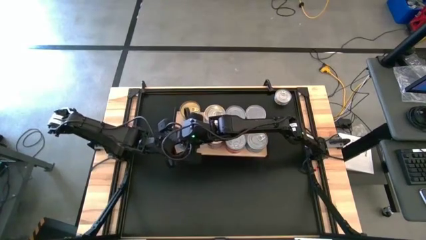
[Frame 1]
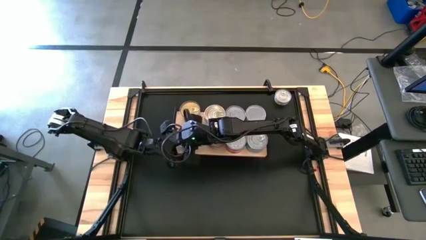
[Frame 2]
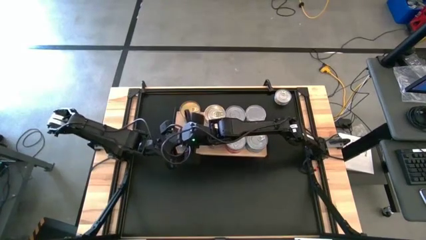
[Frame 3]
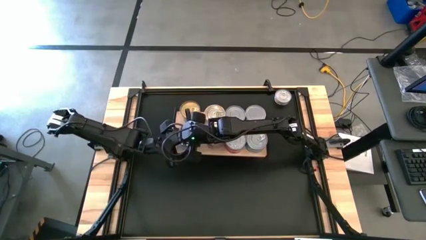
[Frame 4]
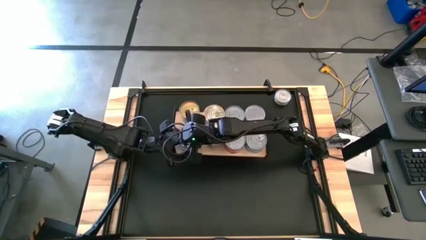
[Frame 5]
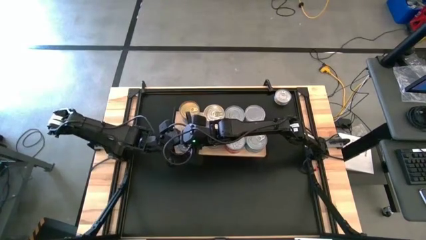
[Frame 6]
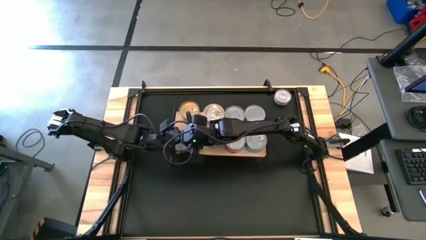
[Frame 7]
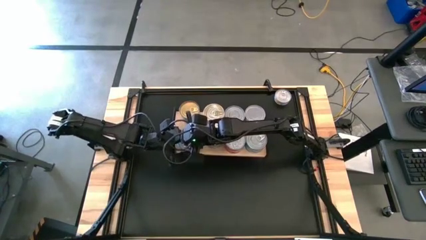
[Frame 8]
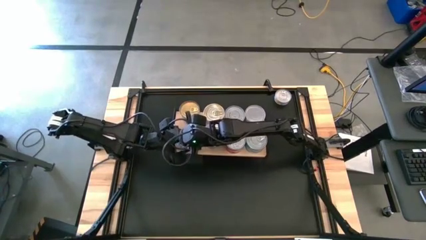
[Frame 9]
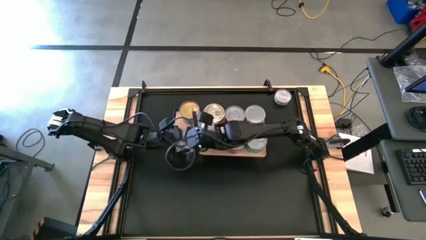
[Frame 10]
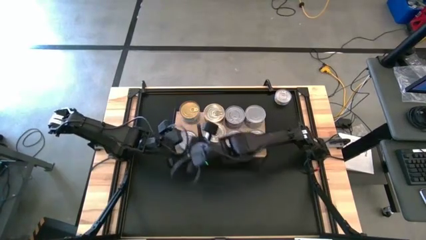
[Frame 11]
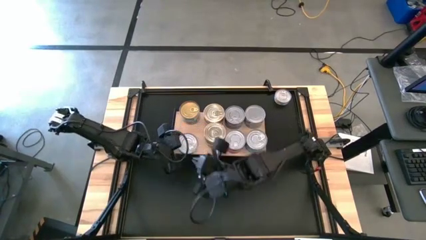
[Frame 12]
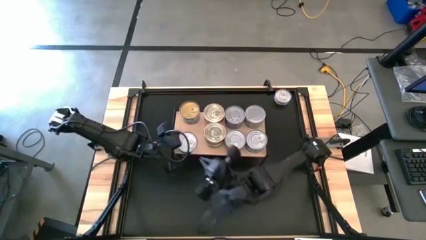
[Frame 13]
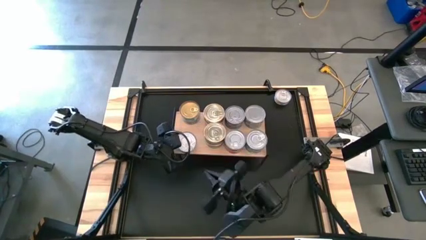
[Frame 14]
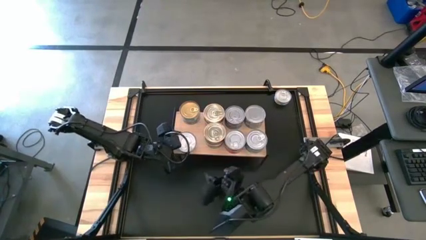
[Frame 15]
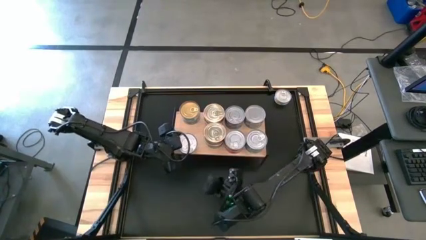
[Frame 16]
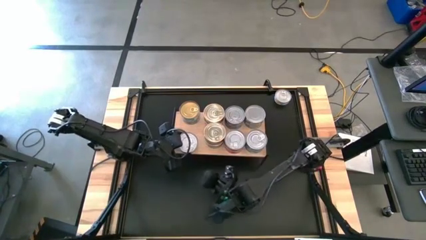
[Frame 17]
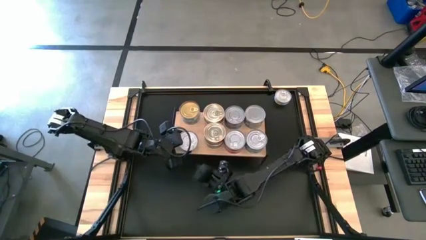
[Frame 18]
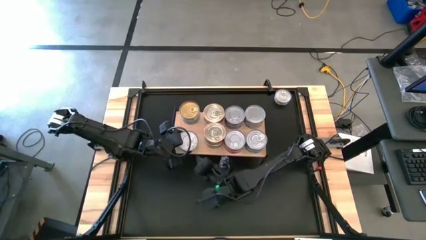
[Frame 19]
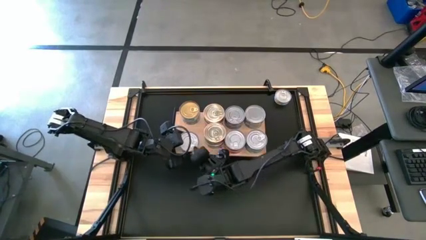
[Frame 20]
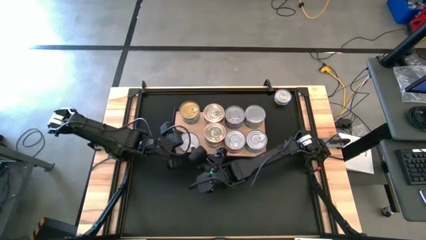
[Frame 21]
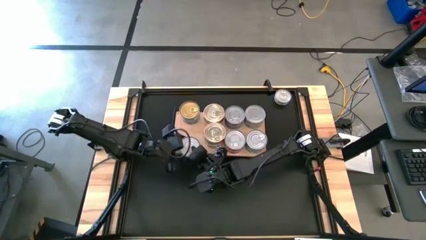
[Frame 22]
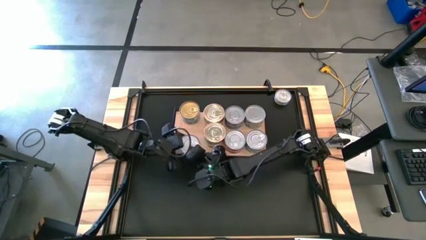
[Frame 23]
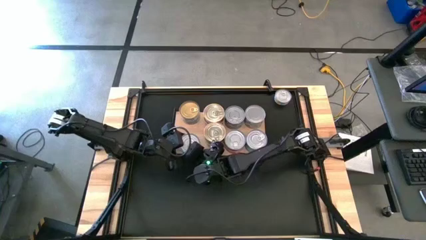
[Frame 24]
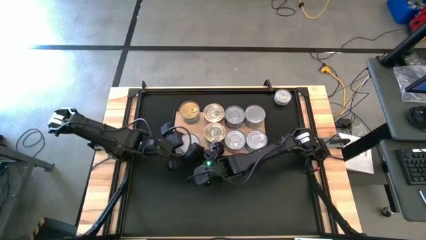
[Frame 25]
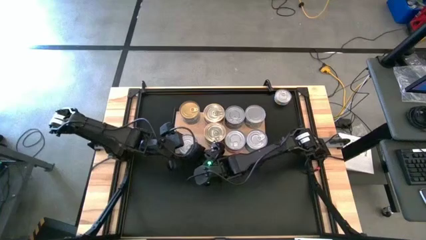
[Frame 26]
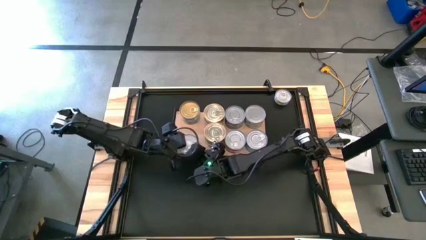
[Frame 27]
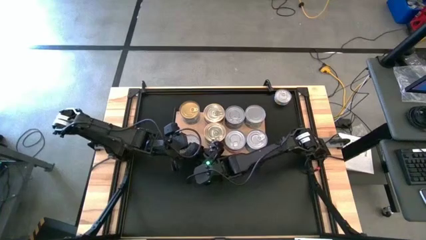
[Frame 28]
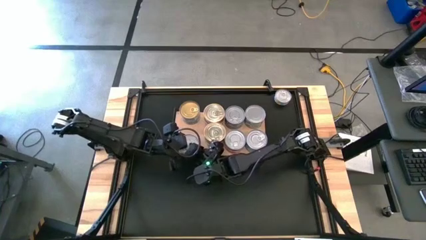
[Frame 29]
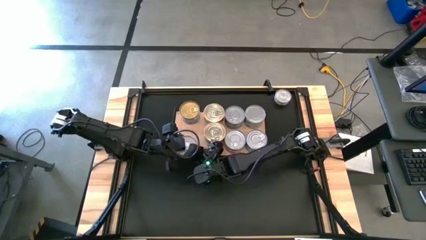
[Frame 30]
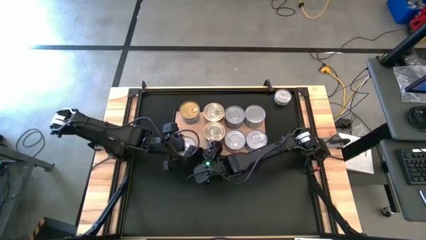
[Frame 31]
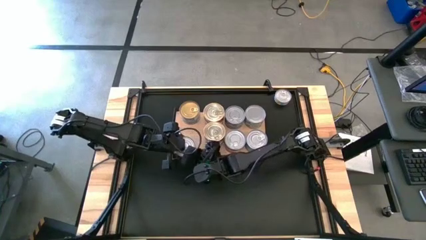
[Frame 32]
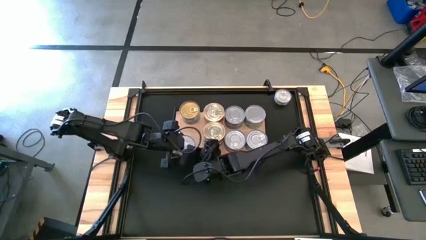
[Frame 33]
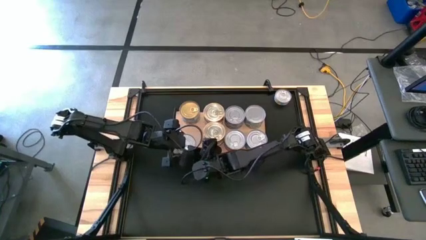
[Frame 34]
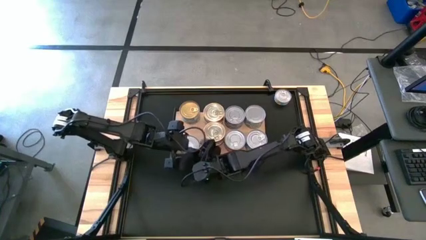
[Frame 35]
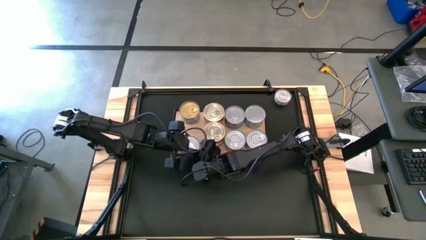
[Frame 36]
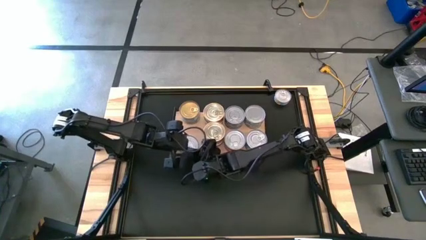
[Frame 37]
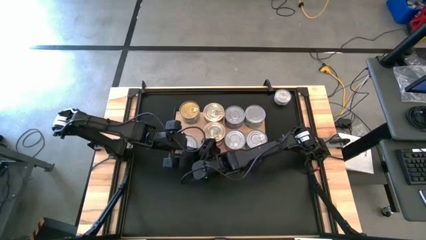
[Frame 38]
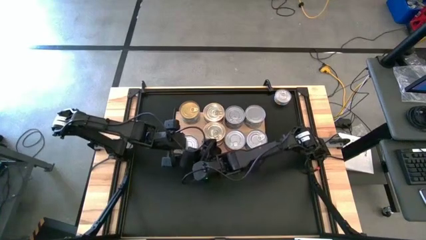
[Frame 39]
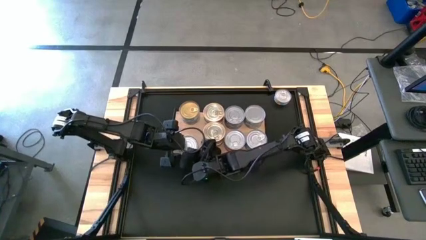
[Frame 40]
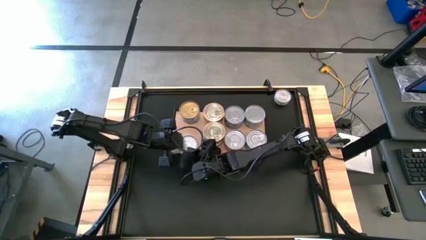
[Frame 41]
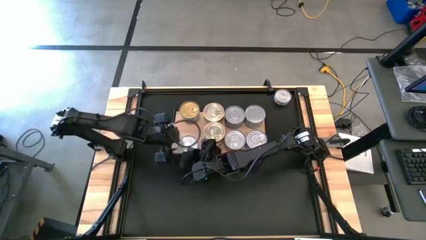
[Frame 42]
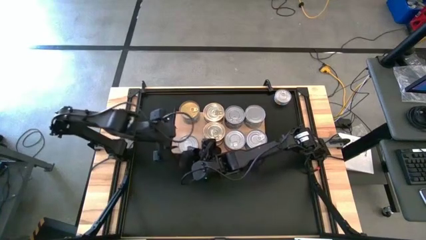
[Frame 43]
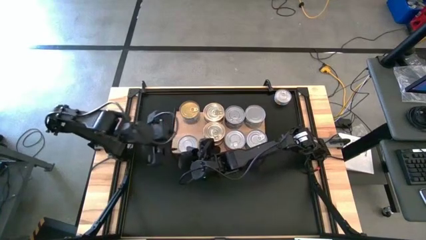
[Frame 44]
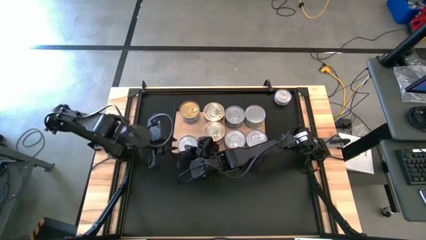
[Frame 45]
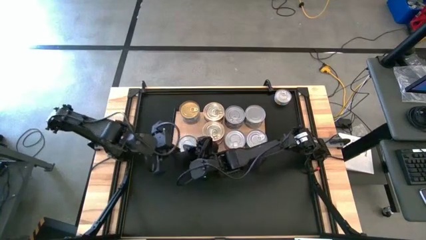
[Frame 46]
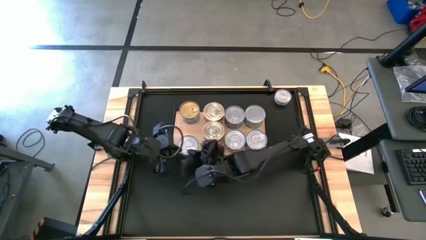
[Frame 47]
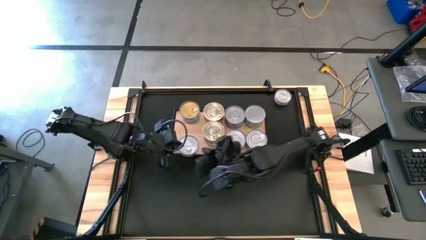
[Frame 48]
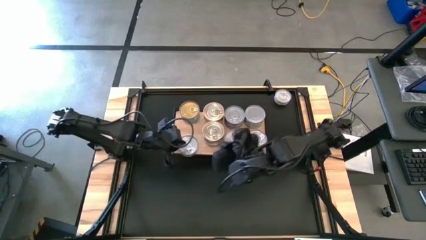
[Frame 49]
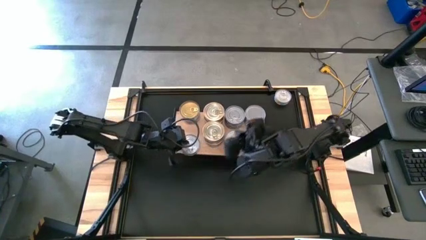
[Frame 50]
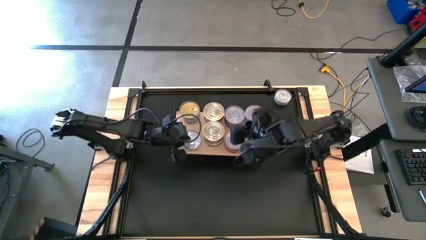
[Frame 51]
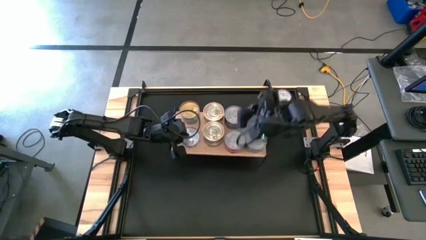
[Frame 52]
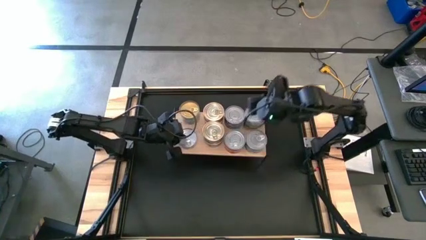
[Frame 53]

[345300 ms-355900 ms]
Task: Stack canned seafood by type on shelf
Put the yellow blue tuna can on the shelf

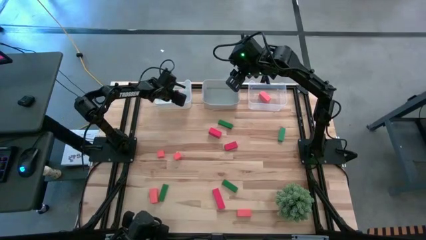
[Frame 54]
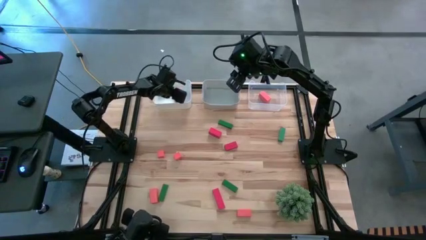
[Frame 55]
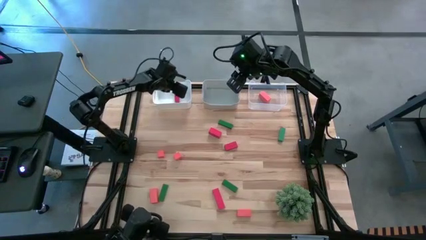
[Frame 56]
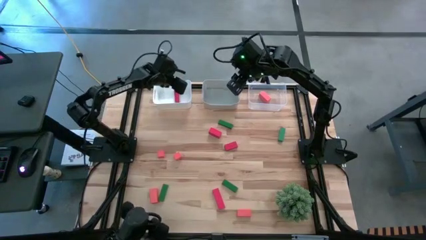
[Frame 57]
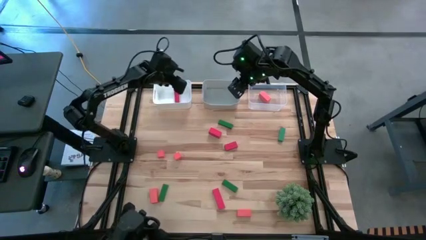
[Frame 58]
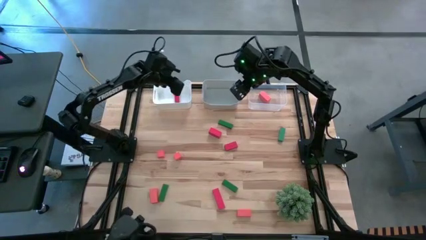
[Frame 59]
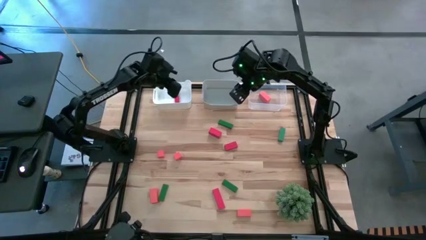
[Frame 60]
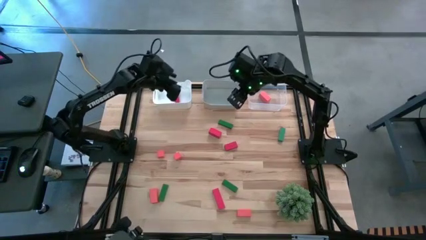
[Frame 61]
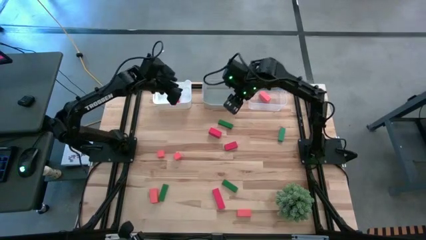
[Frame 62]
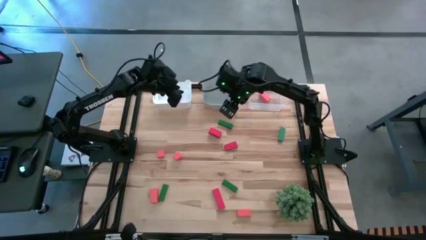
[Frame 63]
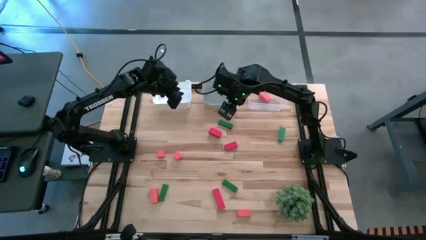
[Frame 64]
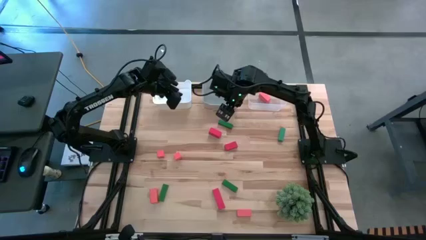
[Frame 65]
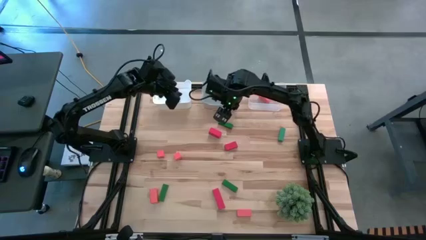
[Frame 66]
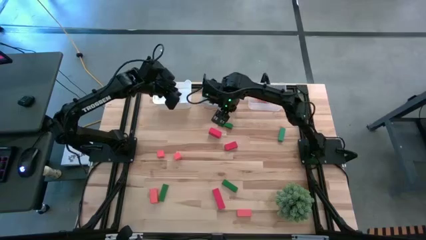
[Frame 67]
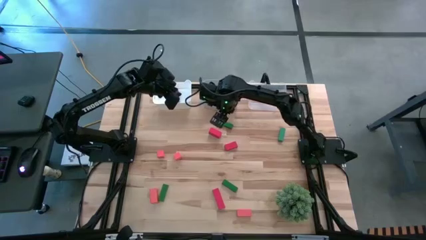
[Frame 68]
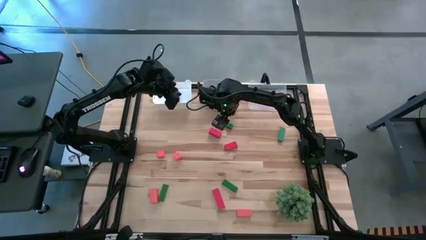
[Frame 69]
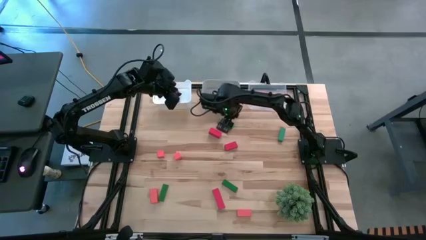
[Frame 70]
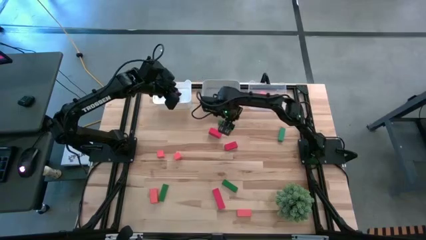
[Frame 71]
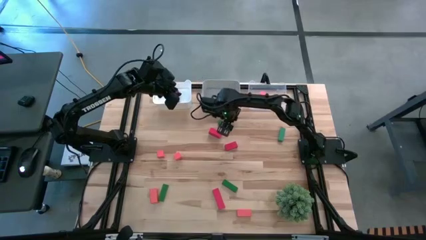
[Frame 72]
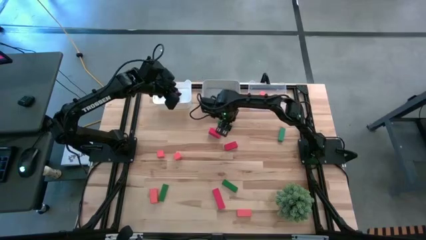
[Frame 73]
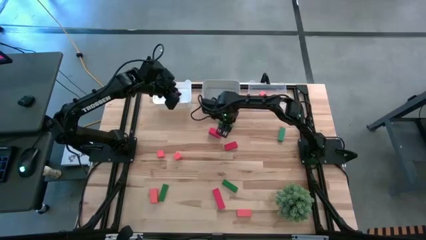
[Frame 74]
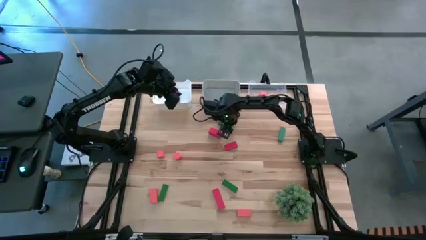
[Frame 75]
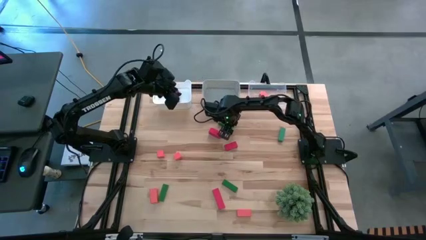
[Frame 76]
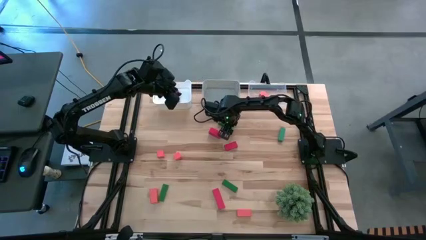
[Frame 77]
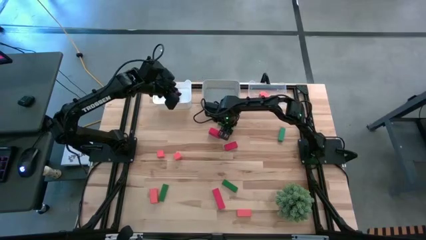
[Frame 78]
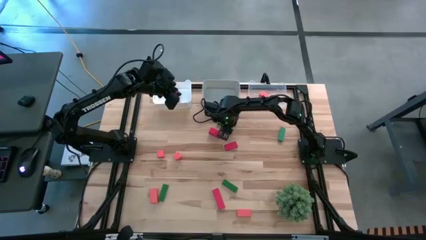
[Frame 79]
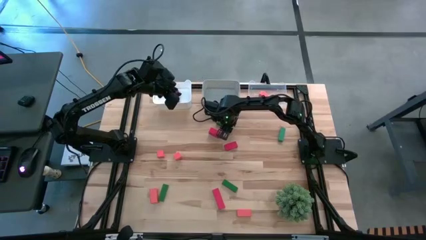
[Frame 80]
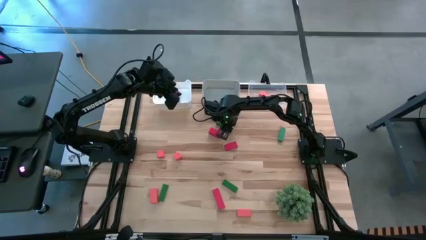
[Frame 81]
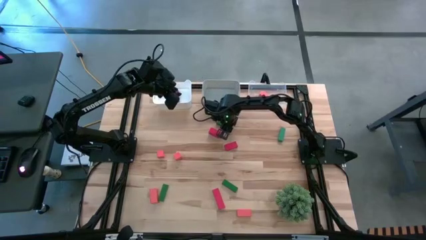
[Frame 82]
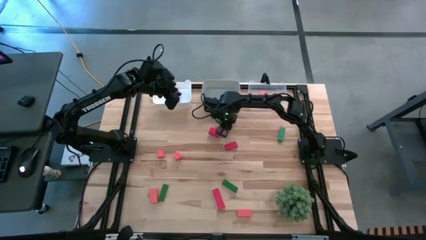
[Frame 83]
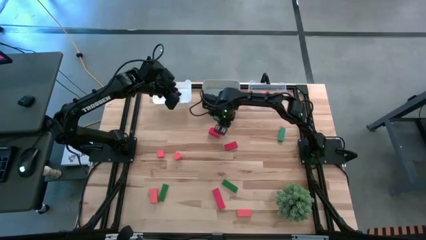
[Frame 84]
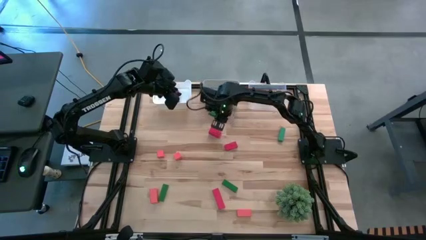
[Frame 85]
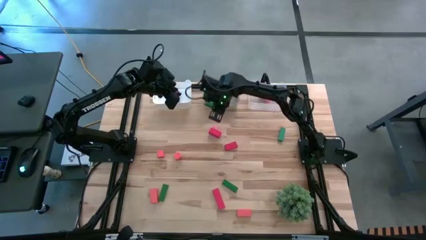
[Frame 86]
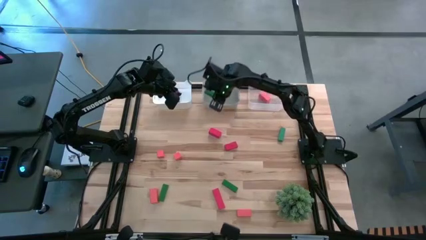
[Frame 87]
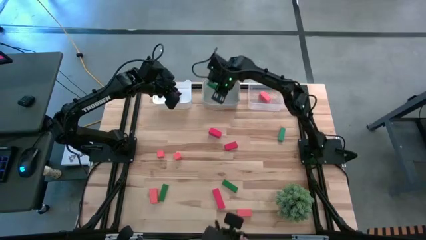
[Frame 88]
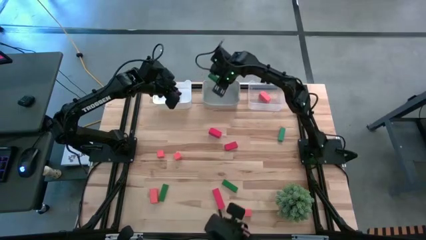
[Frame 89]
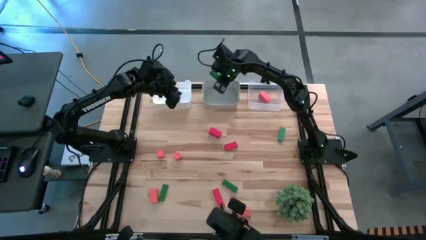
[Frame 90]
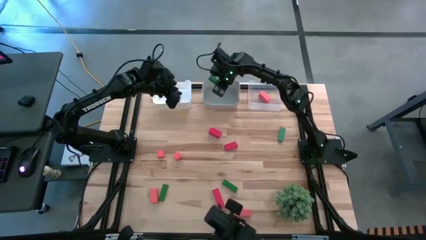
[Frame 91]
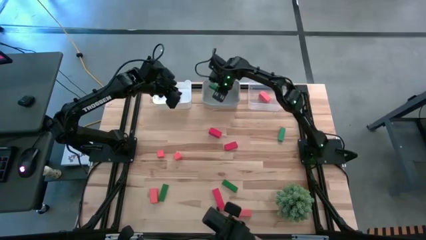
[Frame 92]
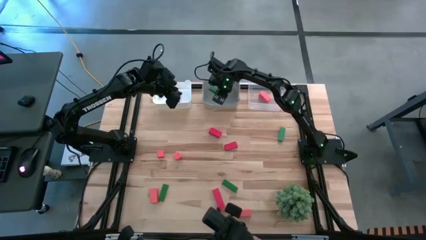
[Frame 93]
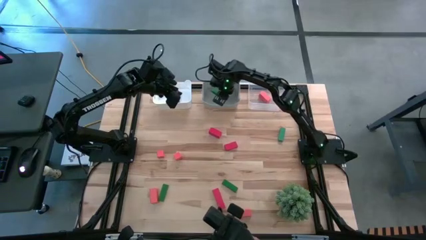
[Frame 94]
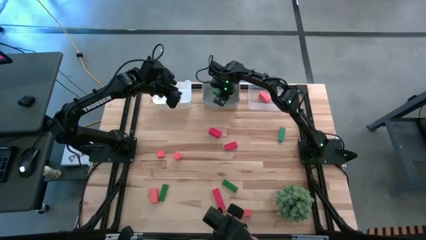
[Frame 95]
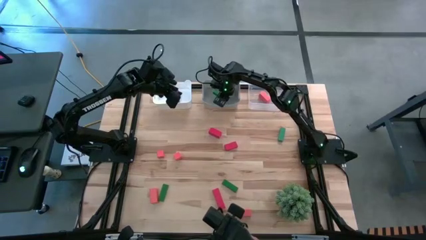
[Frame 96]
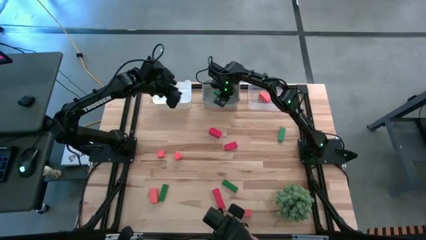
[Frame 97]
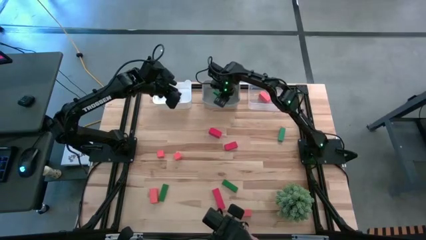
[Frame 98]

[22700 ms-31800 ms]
Task: Sort & place blocks by color
Put the top left green block into the grey bin
